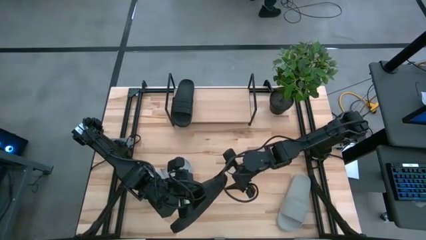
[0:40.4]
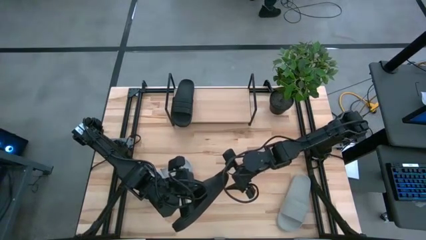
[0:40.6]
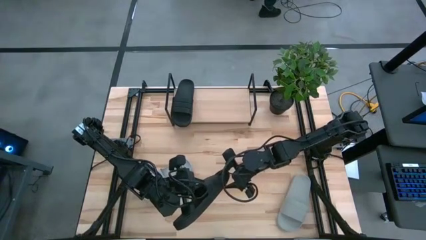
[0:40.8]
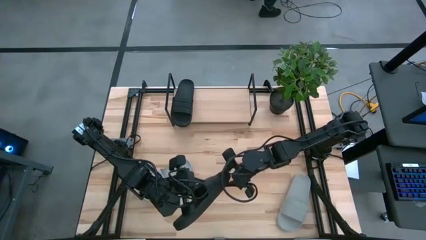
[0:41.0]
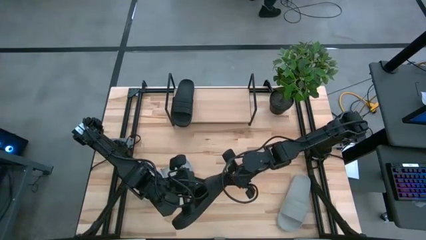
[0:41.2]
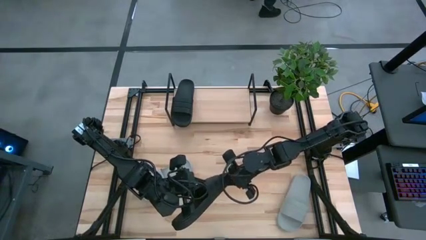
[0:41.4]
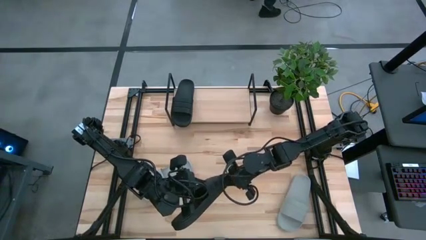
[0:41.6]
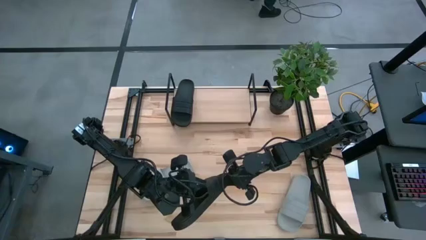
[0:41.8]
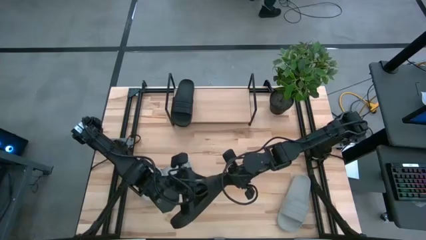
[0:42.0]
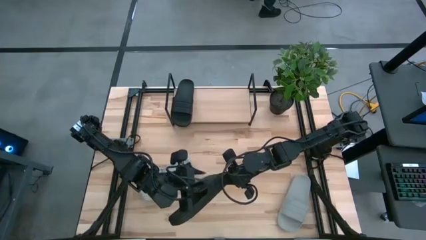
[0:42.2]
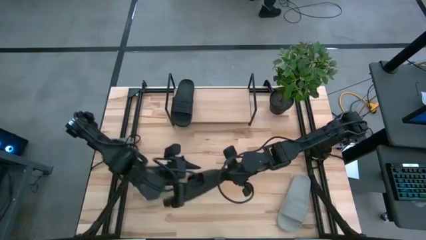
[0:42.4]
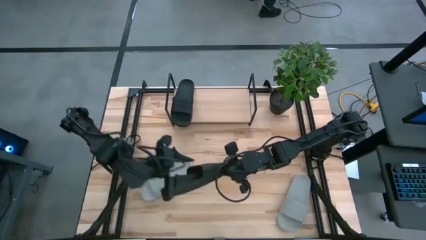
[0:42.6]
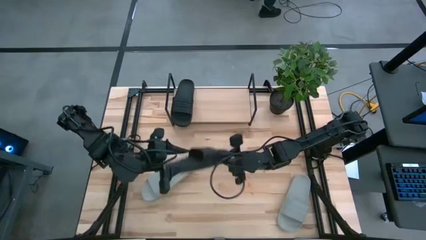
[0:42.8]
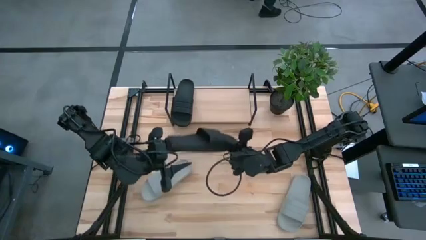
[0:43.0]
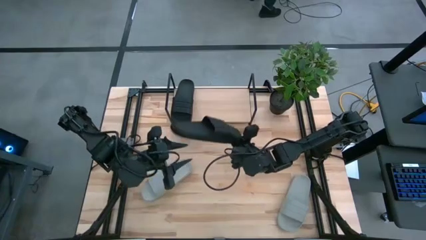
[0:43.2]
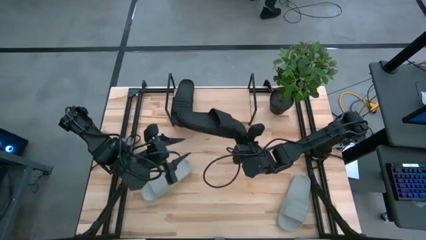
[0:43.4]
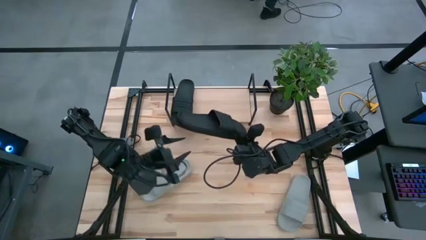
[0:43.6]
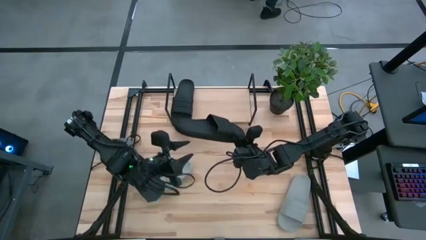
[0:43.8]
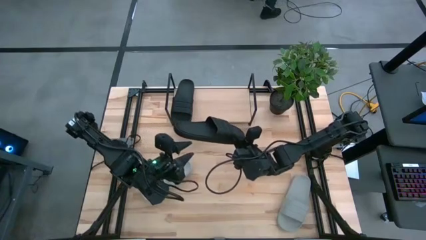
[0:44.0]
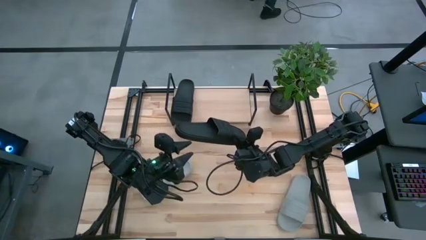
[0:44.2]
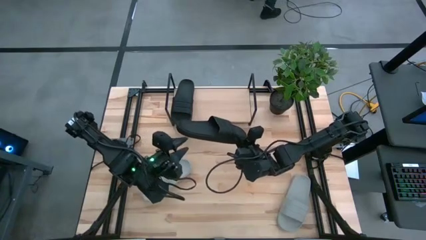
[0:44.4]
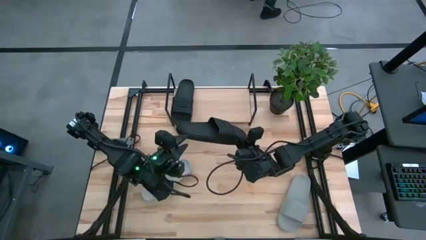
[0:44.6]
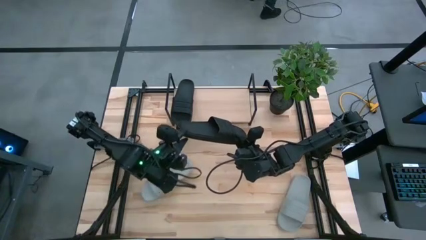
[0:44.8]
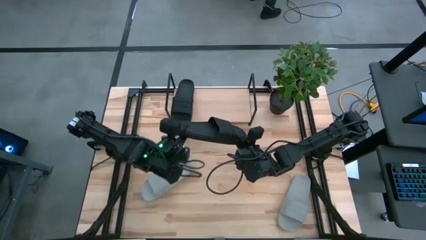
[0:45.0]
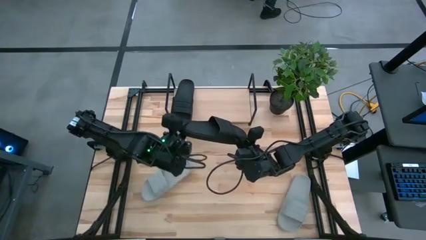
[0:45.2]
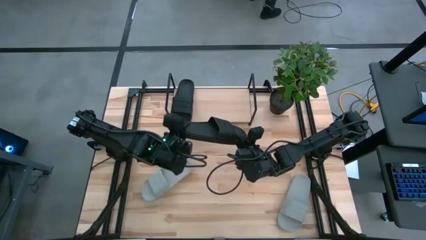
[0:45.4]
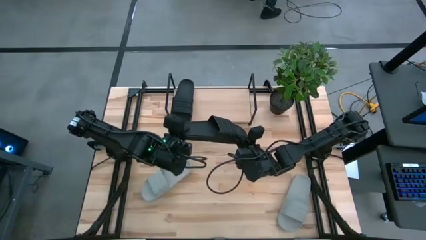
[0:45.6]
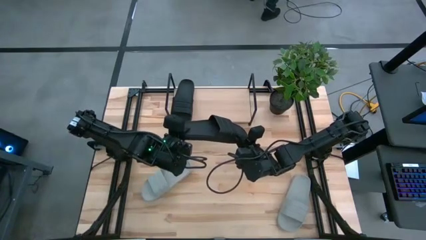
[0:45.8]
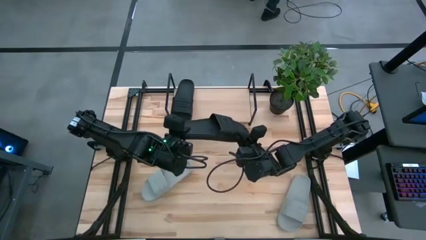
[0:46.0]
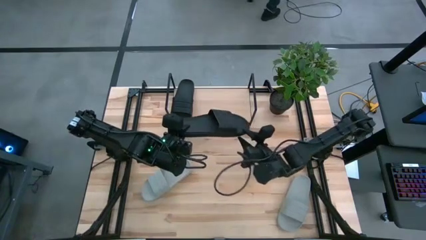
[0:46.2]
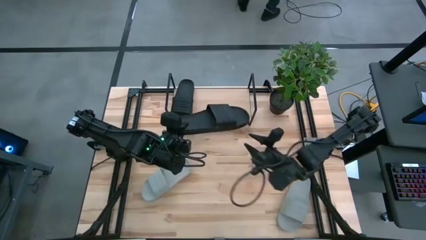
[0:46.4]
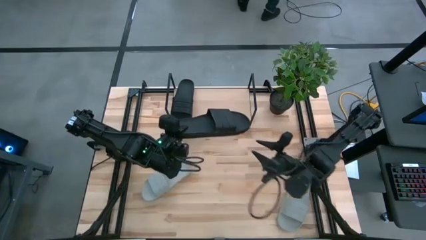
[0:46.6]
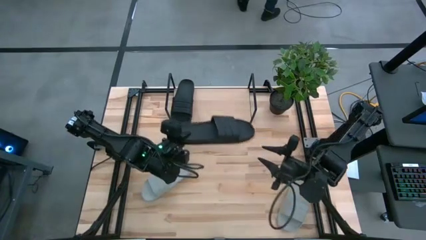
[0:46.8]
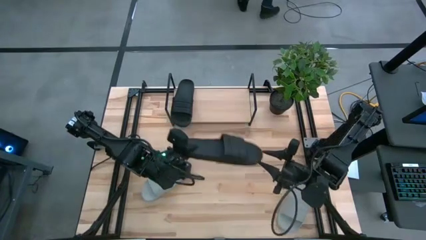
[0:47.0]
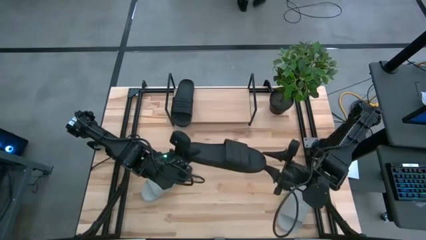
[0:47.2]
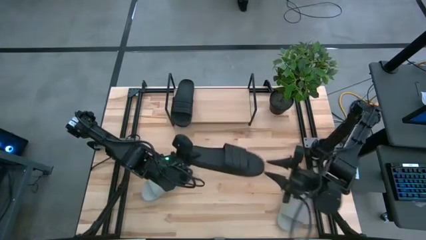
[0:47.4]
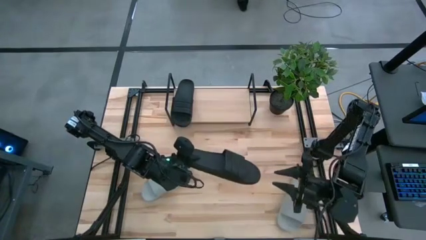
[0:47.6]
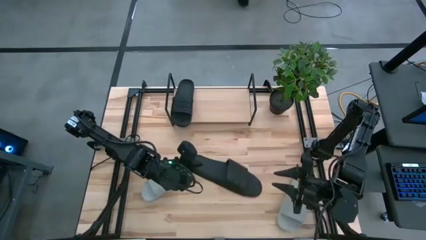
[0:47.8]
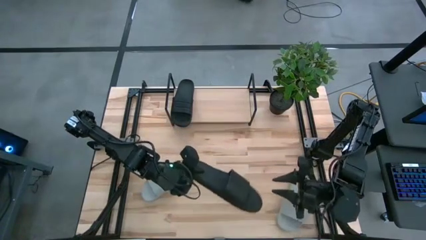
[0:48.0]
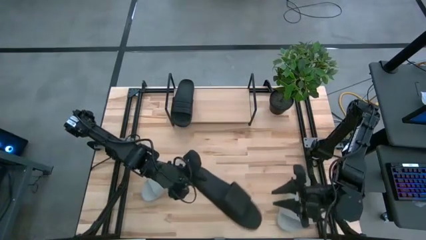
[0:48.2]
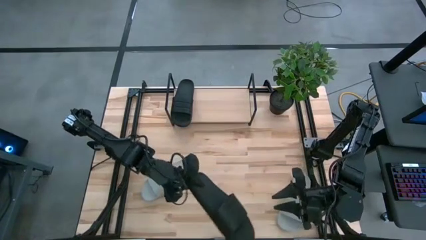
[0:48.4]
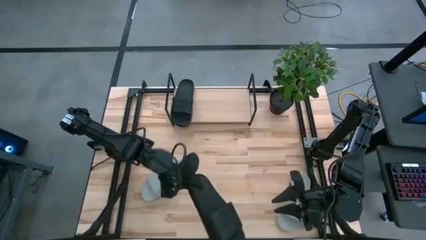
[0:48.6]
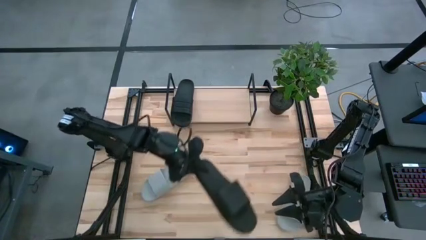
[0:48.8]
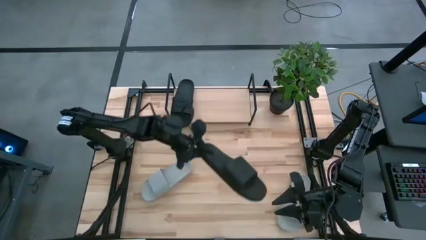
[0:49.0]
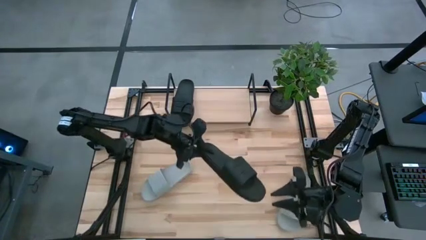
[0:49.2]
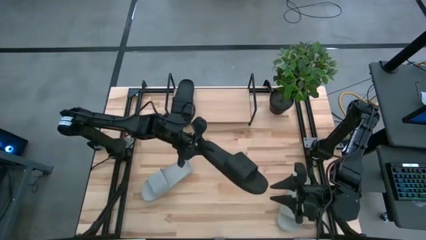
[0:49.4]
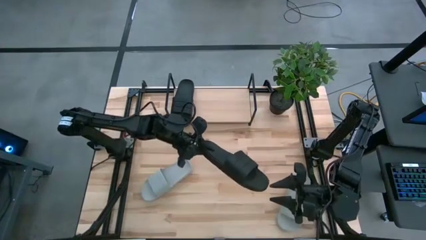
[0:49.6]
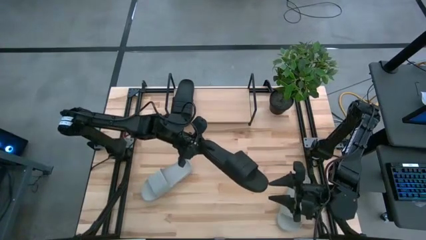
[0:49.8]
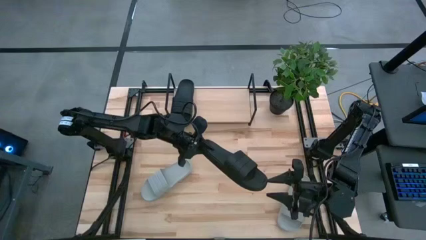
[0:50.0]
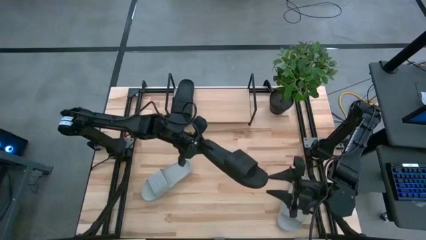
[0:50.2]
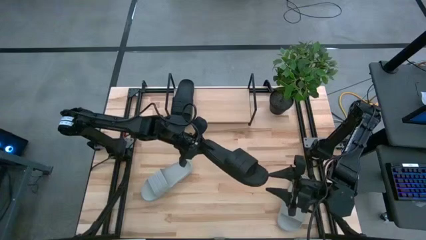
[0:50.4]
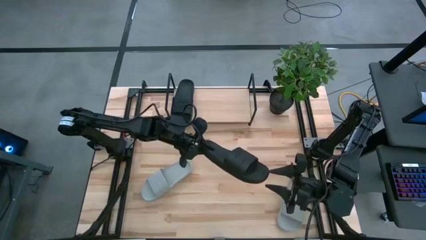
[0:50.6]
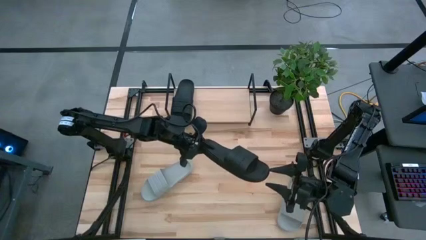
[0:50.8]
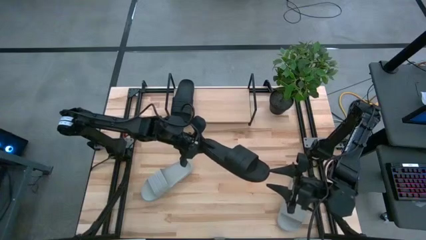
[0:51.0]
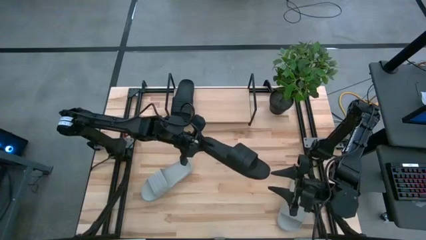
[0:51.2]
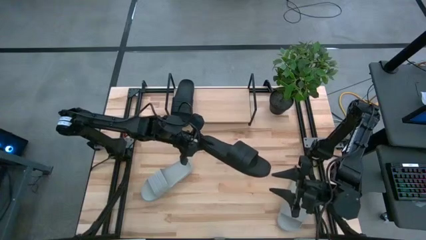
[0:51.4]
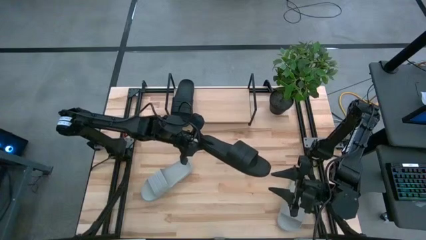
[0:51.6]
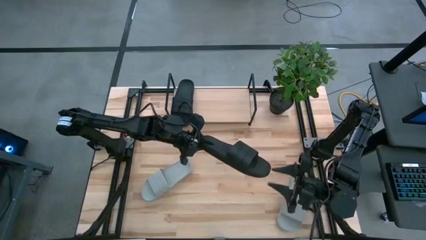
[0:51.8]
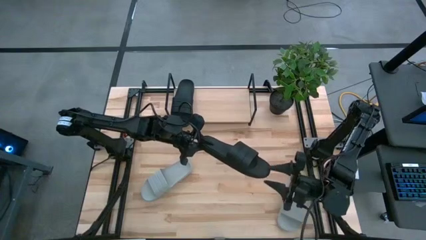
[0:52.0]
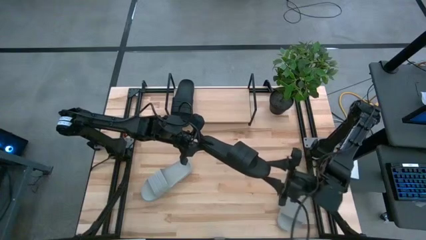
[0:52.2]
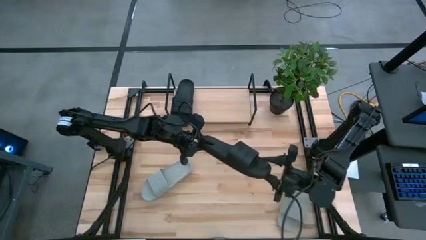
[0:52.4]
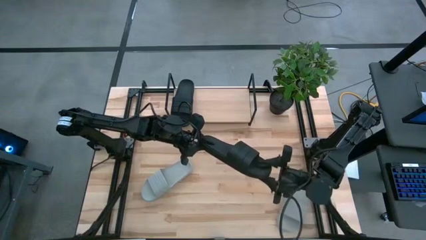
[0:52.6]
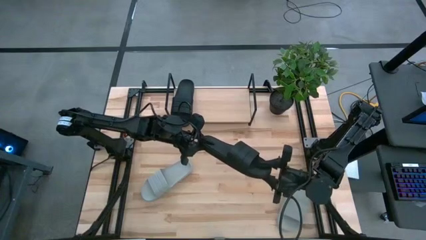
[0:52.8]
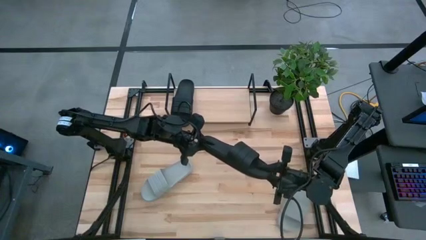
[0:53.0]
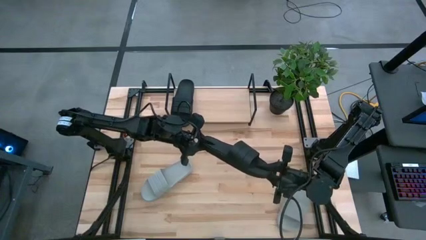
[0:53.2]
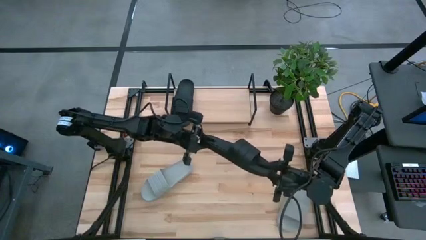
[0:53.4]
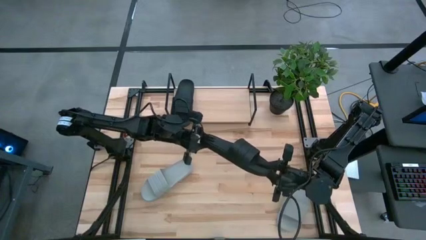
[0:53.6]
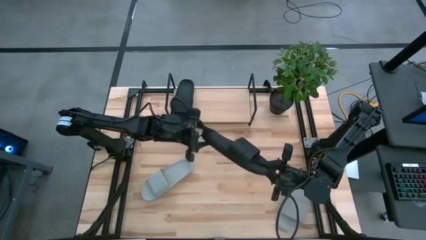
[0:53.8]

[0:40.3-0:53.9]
Task: Pick and place slides into the shelf
Put the black slipper on the shelf

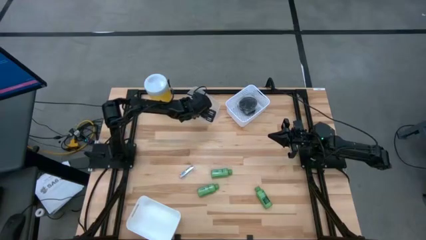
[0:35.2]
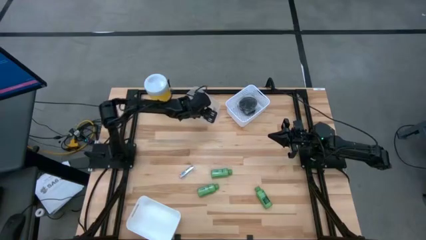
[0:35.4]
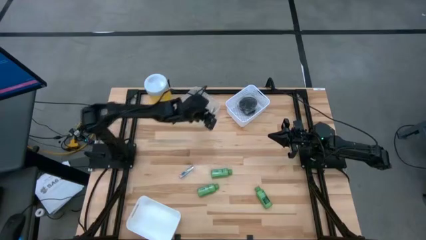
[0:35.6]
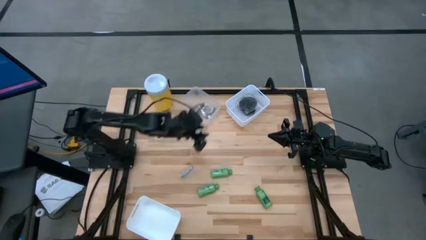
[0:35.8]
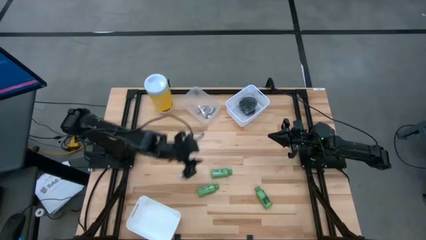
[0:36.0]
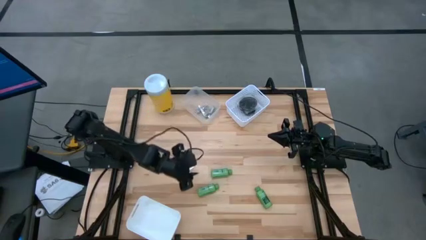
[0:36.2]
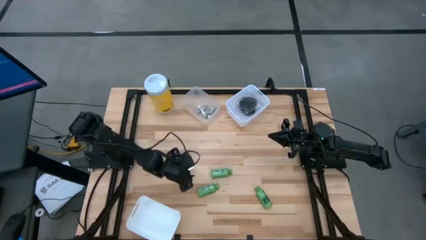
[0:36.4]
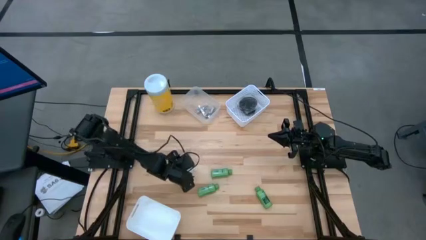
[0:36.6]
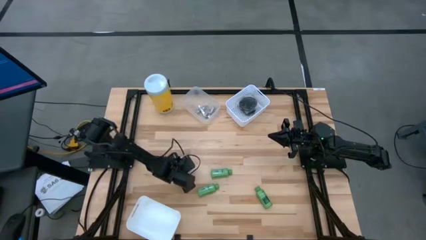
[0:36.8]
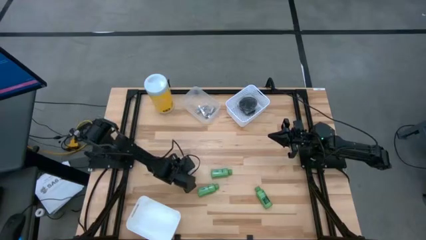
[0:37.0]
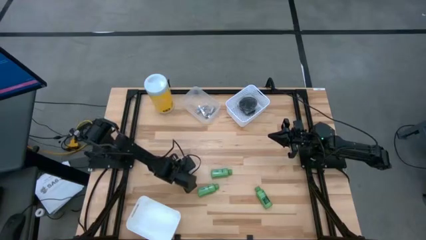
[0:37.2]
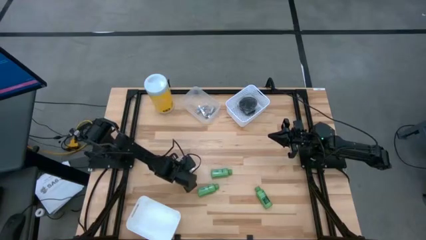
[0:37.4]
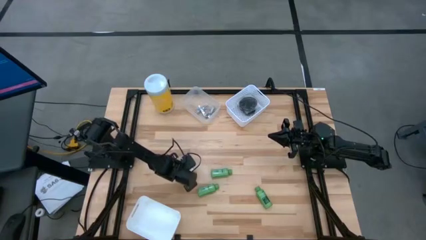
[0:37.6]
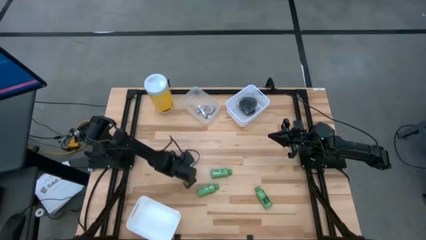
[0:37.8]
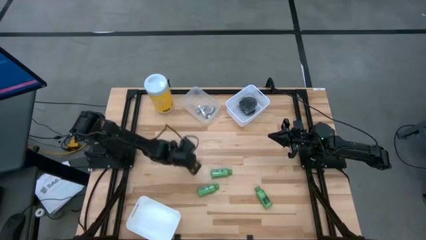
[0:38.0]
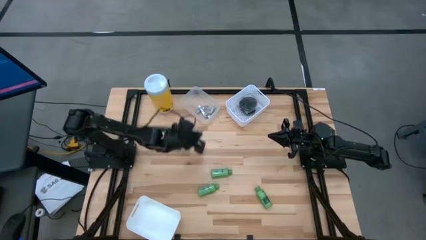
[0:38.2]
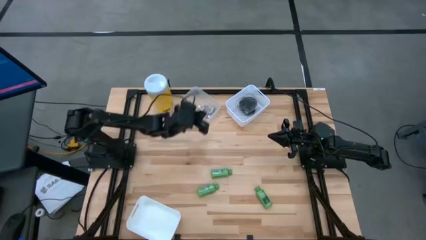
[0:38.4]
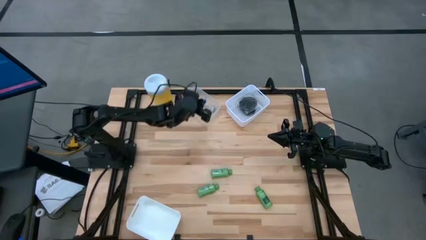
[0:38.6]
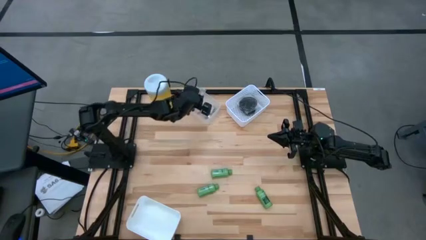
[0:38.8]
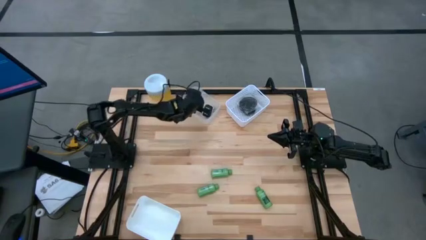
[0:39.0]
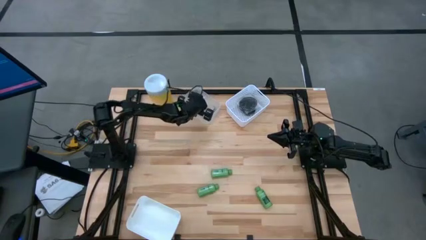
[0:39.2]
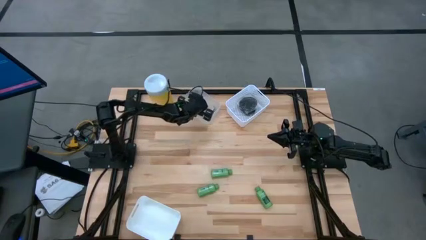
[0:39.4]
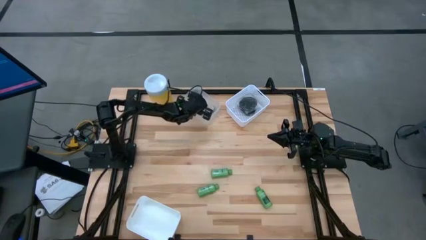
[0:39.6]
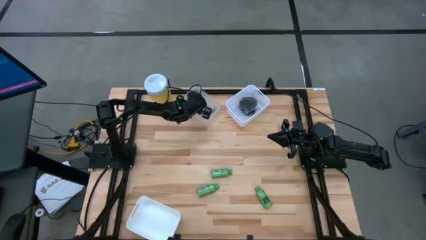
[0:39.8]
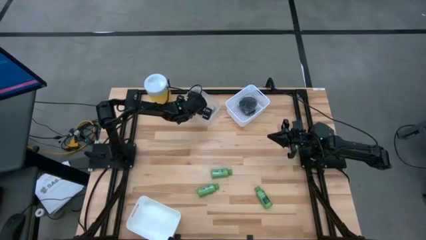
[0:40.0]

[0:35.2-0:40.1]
Task: Pick & Place Travel size toiletries
Put the silver nail cutter into the transparent bin
